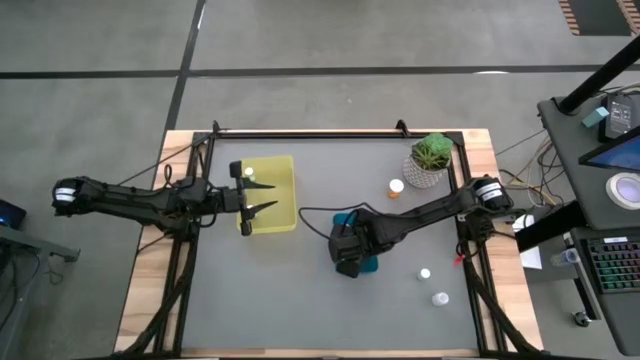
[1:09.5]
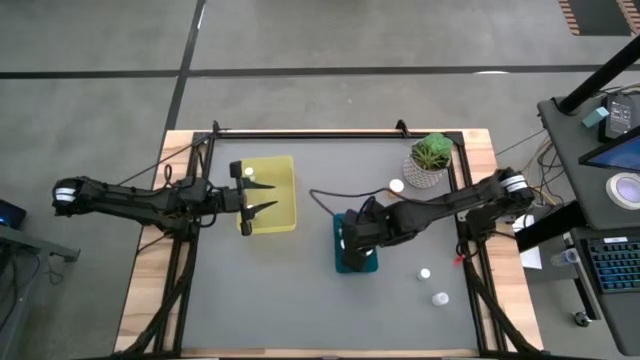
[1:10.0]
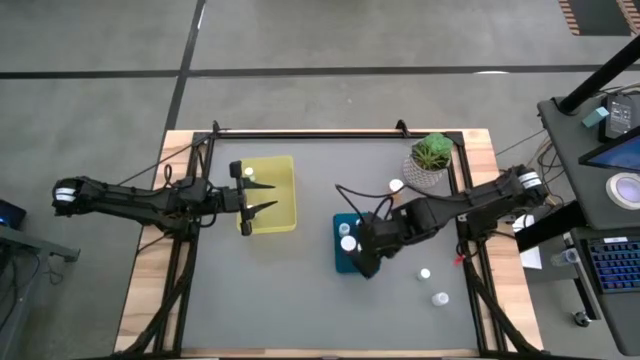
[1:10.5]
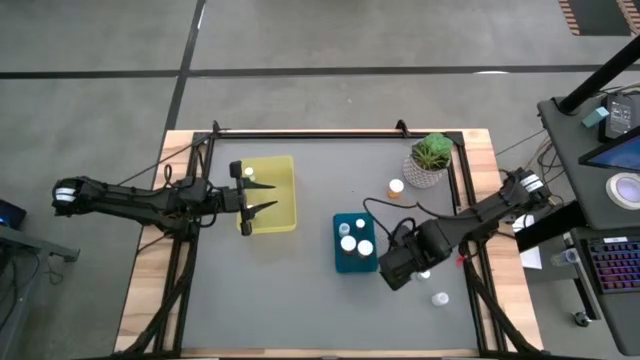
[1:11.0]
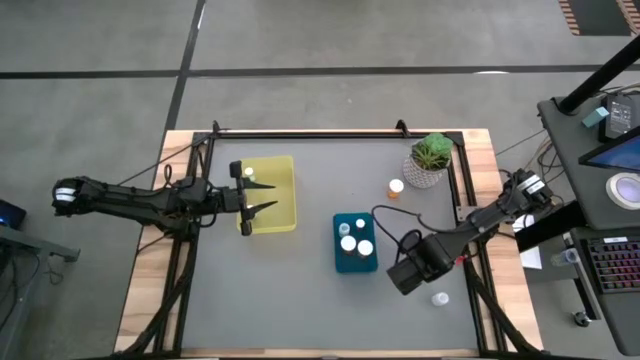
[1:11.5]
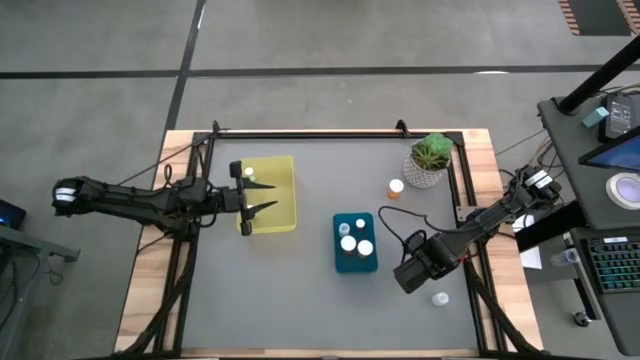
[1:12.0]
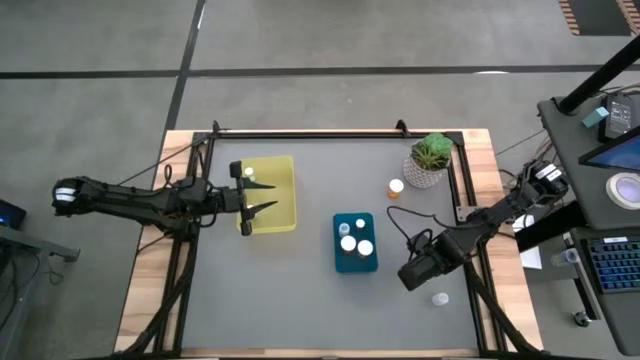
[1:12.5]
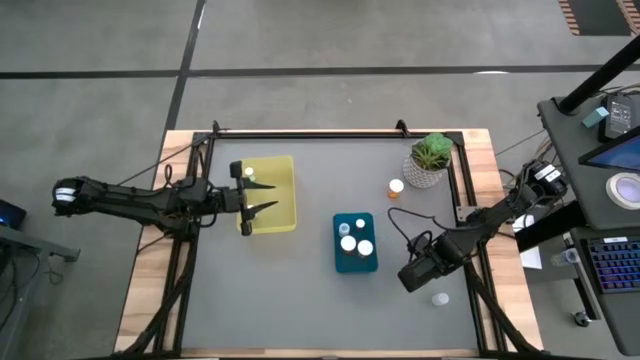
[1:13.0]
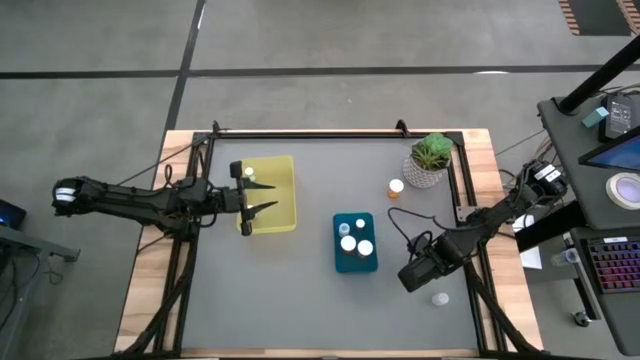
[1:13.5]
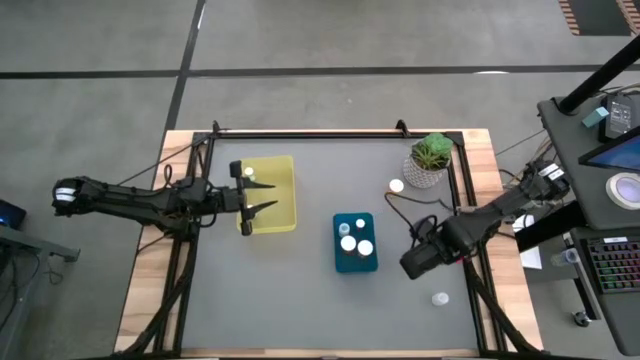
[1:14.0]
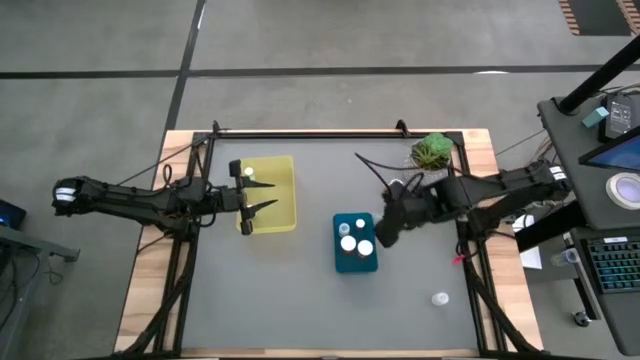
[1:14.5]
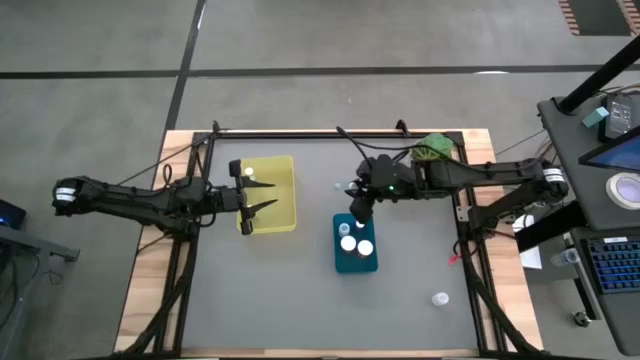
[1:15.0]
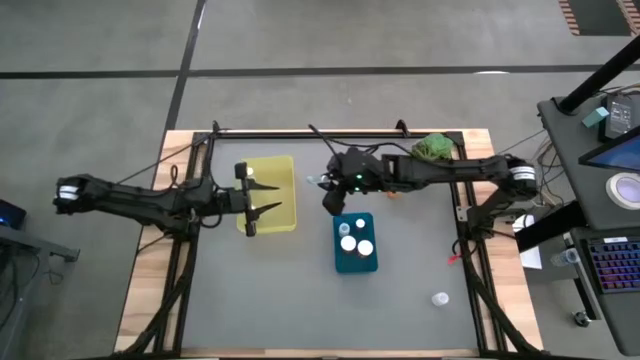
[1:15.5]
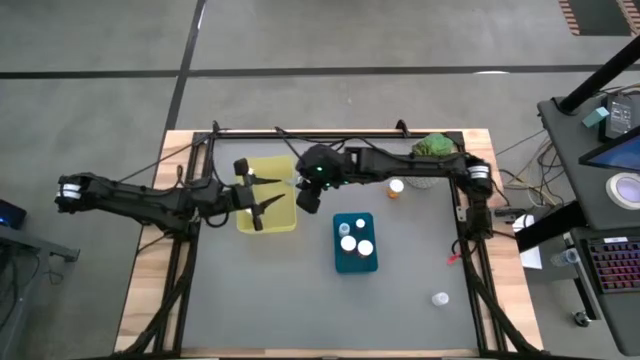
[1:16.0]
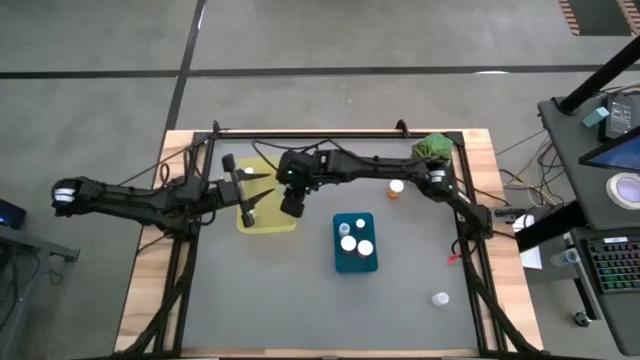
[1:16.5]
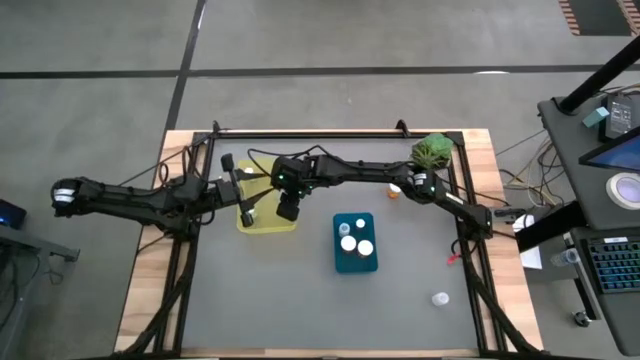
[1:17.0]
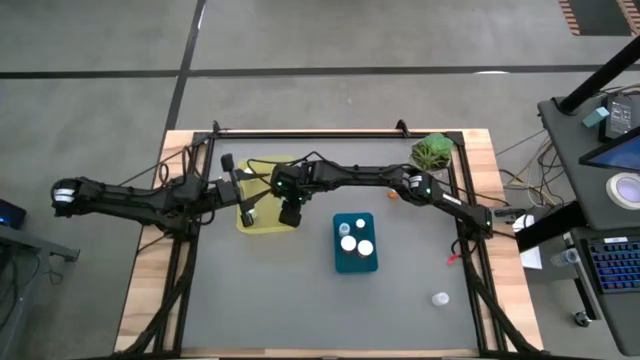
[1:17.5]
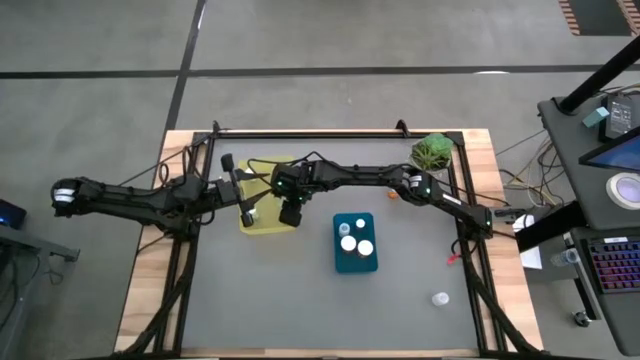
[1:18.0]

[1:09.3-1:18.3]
Task: Pick and place medicine bottles into bin by pill shape (circle, oval)
Put the light blue tablet bottle into the yellow bin

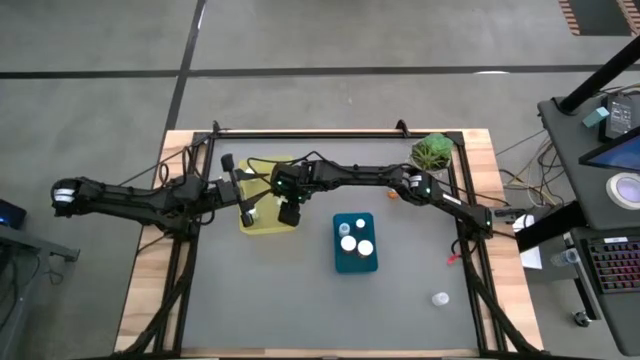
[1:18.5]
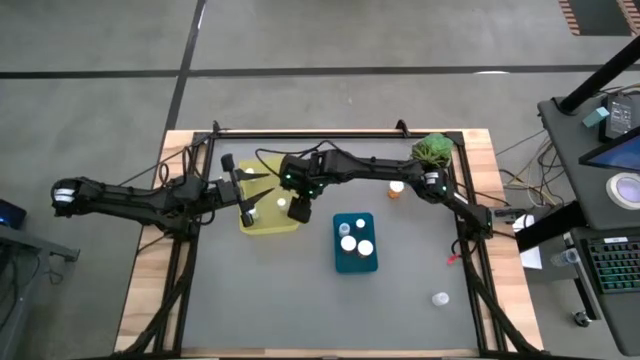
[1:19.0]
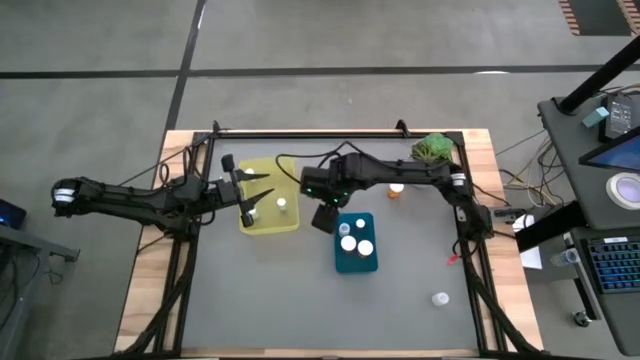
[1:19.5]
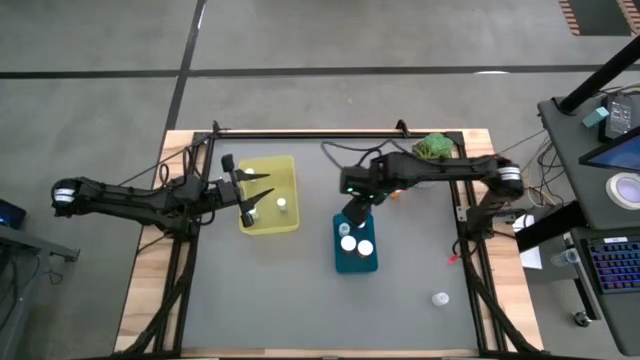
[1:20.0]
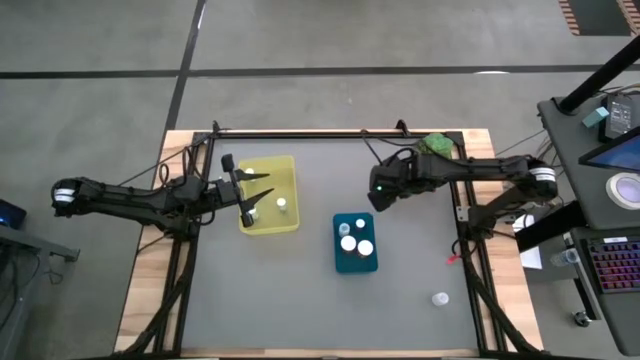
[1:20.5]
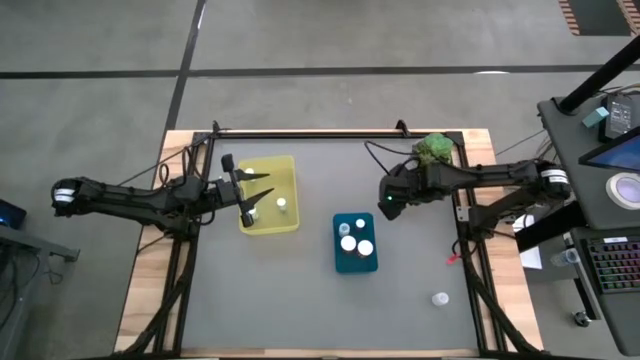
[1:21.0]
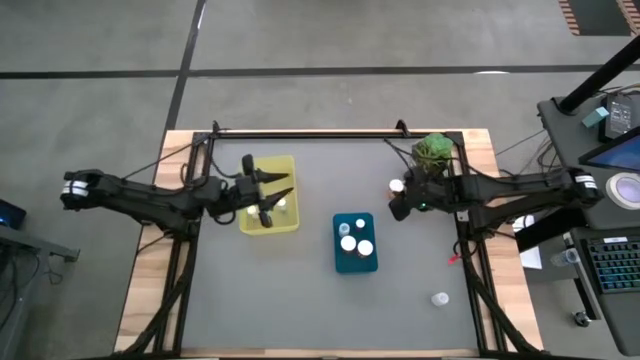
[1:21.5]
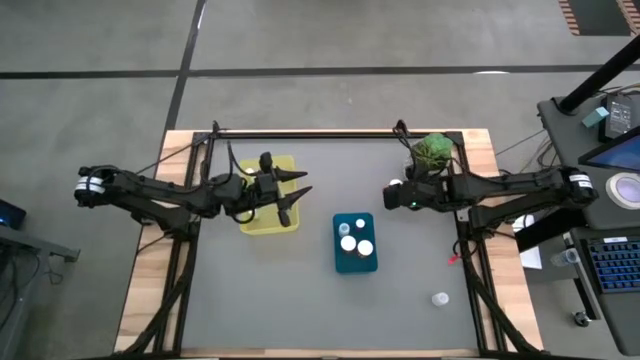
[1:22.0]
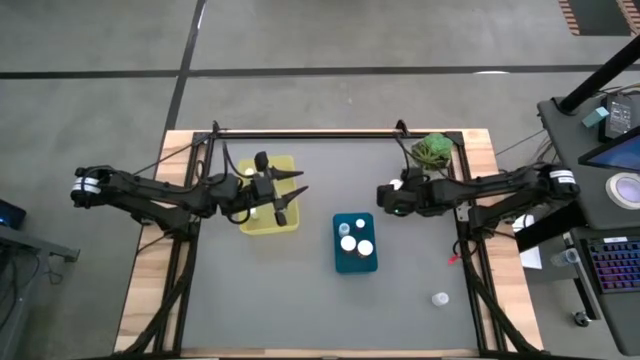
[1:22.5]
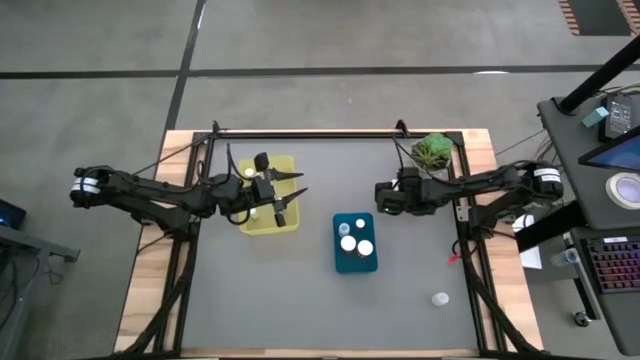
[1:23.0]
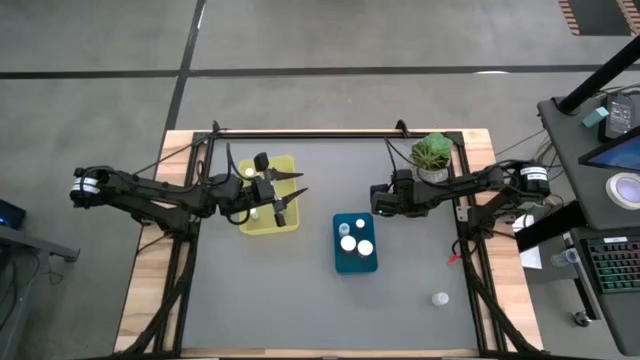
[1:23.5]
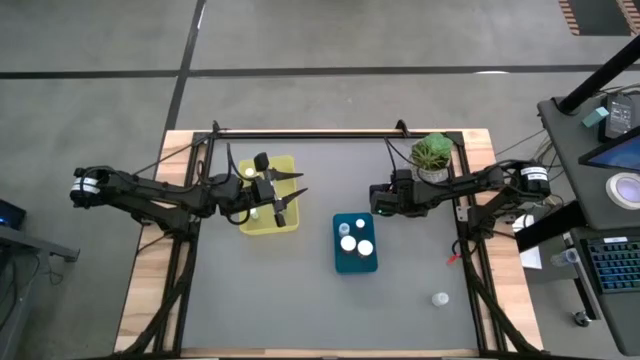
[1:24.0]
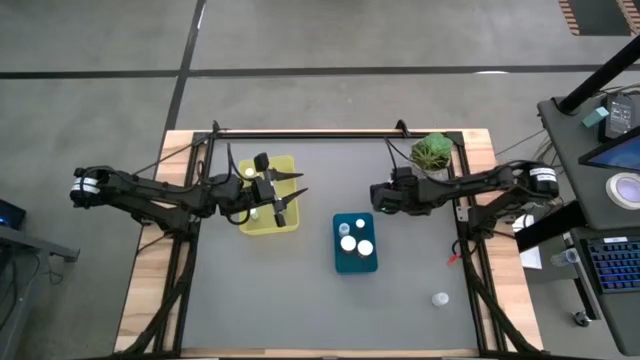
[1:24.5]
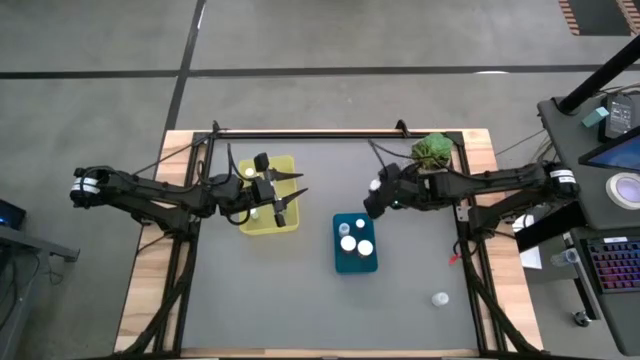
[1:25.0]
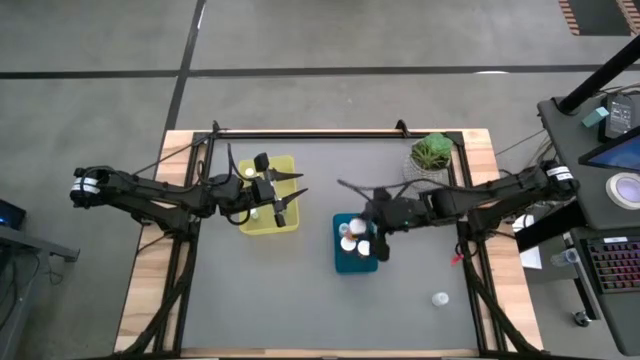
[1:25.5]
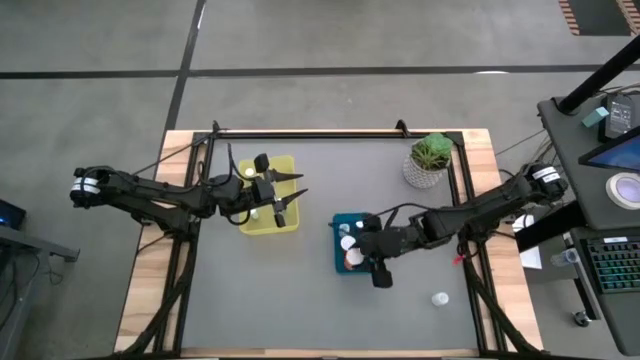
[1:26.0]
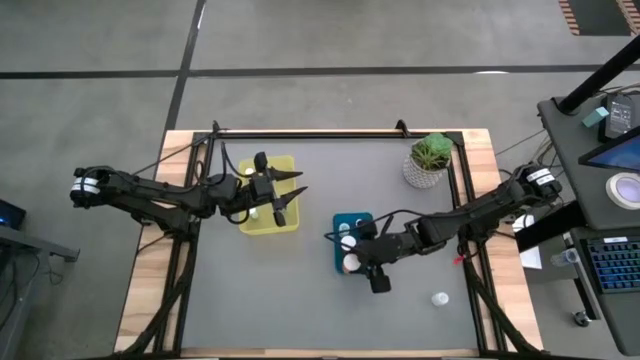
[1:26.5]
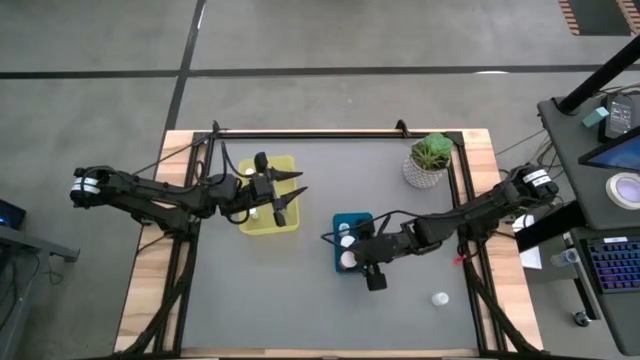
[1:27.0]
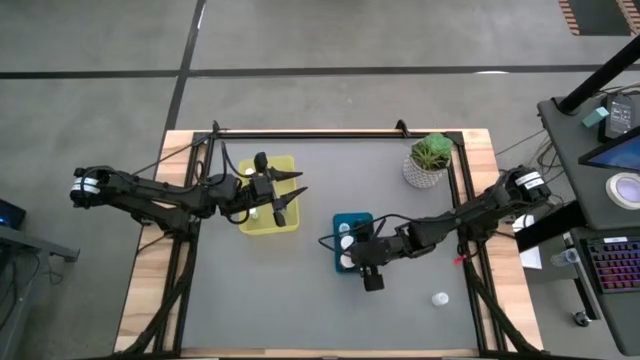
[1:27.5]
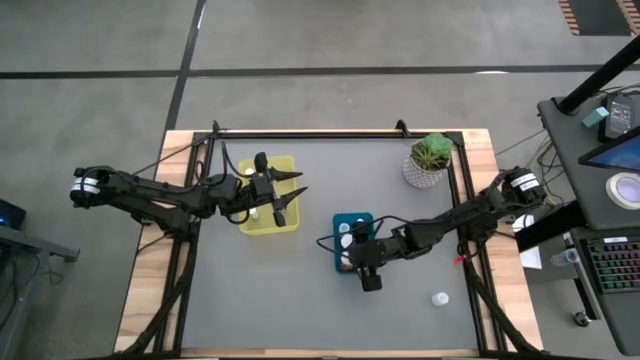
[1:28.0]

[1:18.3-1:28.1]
Put the orange tablet bottle into the blue bin

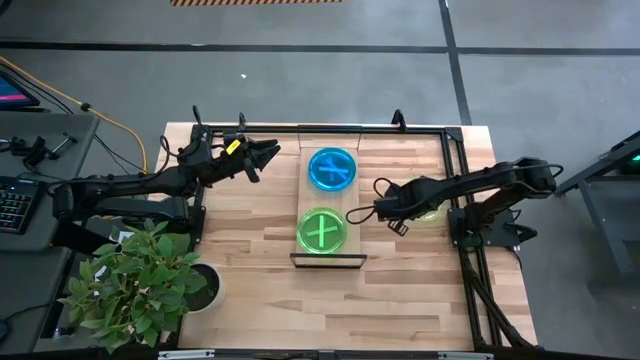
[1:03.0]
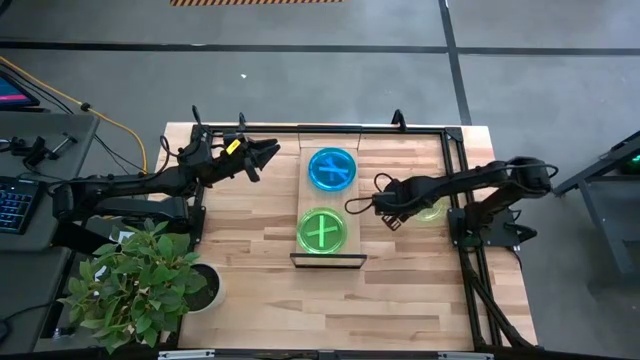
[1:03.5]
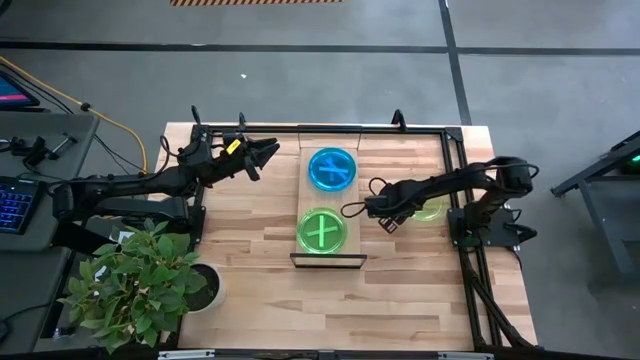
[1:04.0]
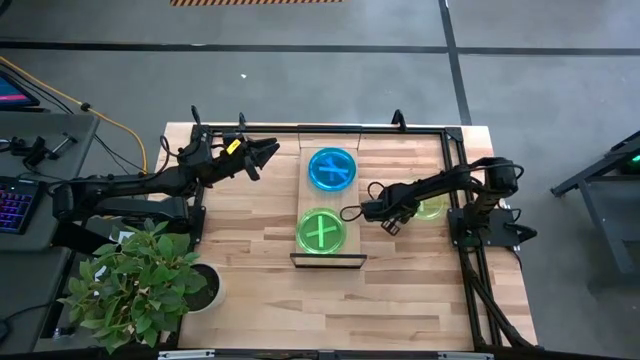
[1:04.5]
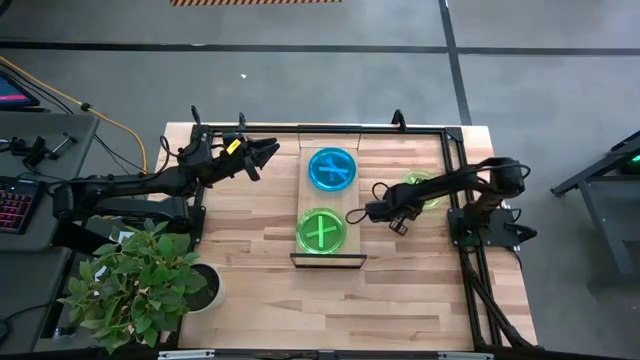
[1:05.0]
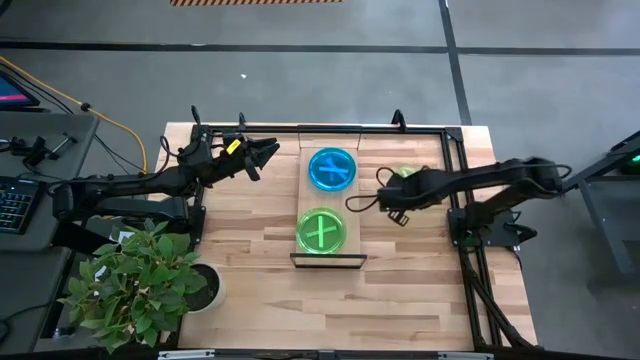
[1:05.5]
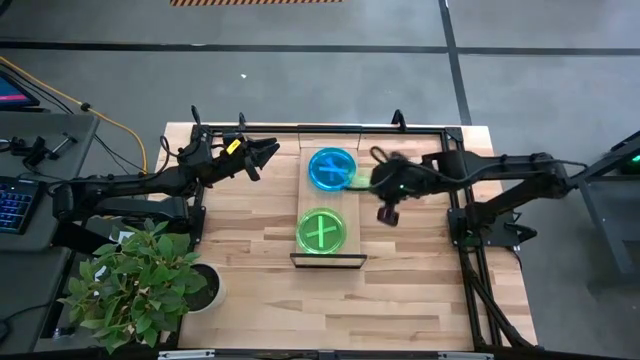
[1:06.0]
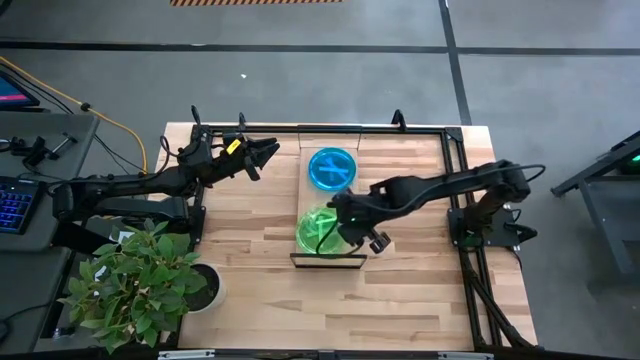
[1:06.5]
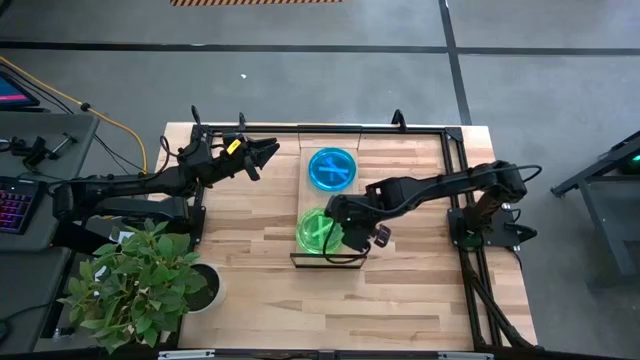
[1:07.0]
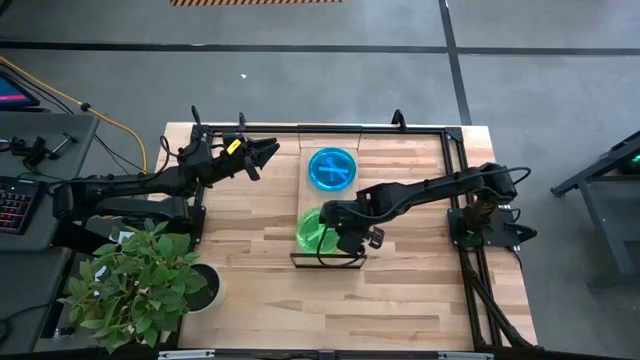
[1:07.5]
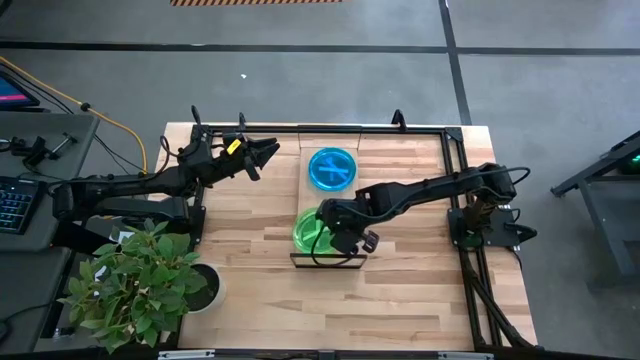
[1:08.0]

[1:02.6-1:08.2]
Task: Place and stack plates onto a shelf
Stack the green plate on top of the green plate on the shelf
